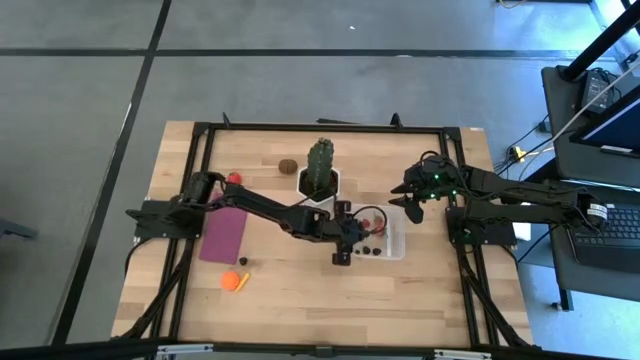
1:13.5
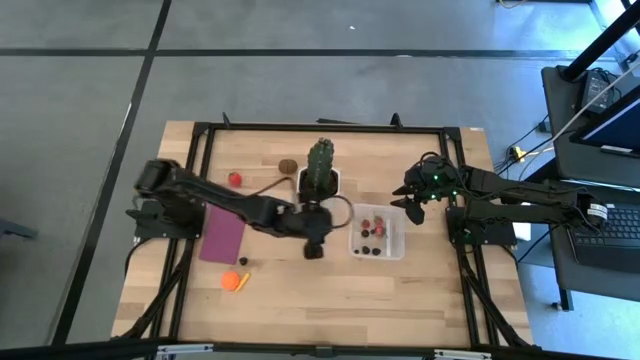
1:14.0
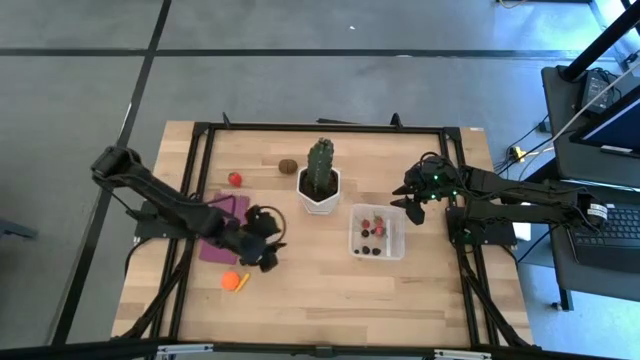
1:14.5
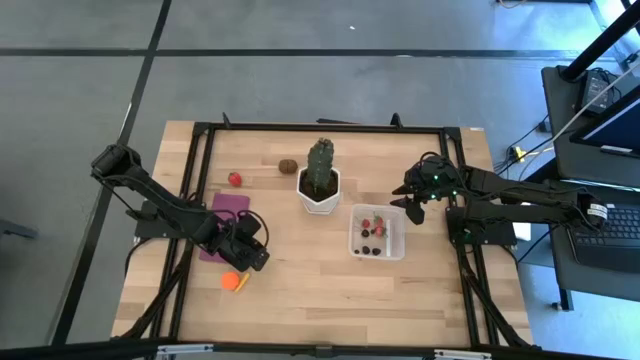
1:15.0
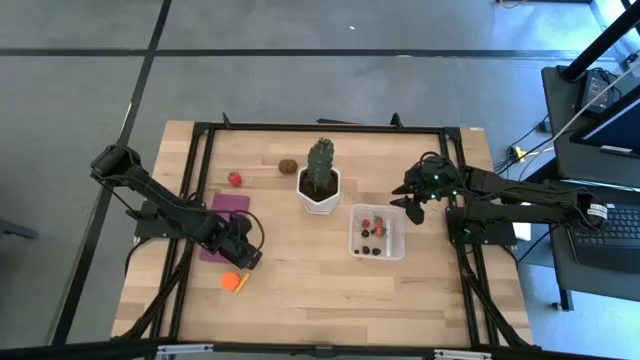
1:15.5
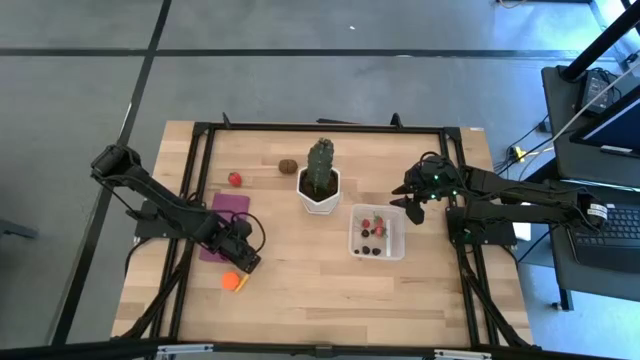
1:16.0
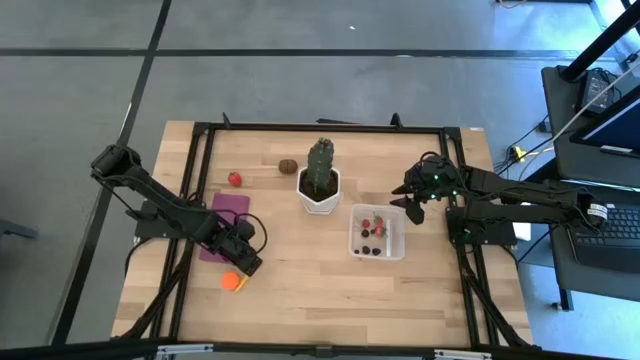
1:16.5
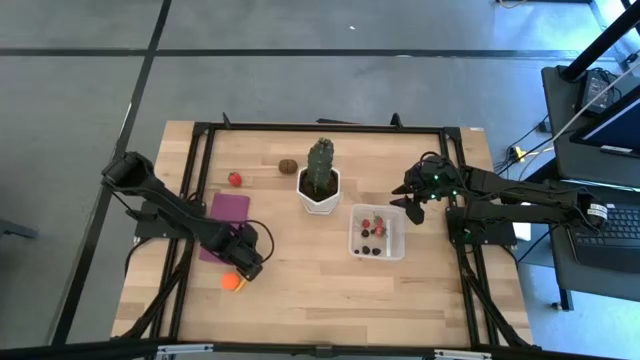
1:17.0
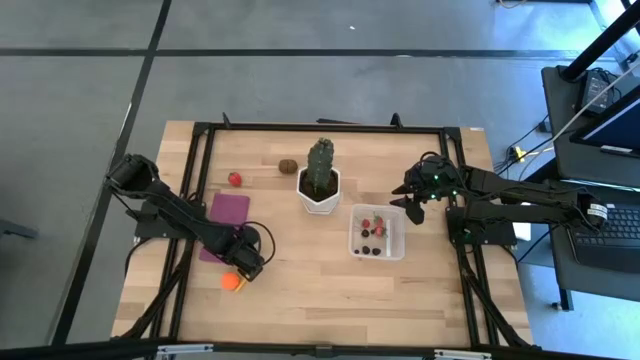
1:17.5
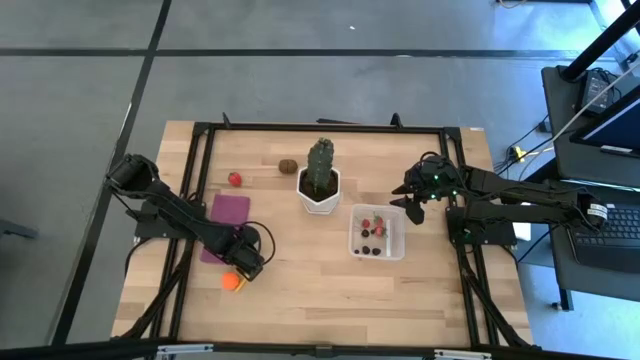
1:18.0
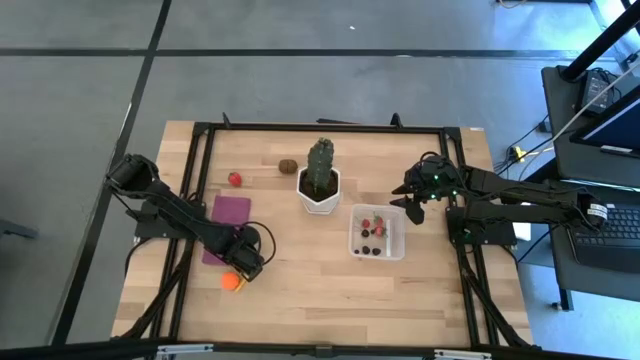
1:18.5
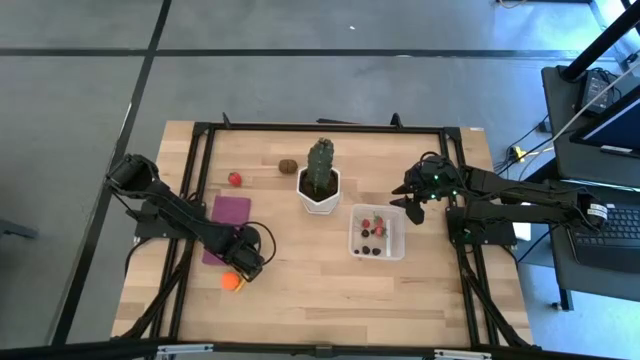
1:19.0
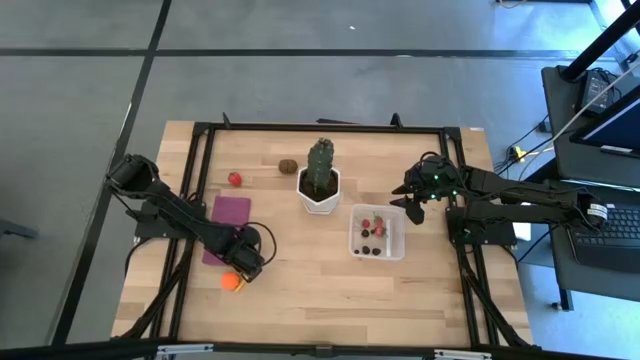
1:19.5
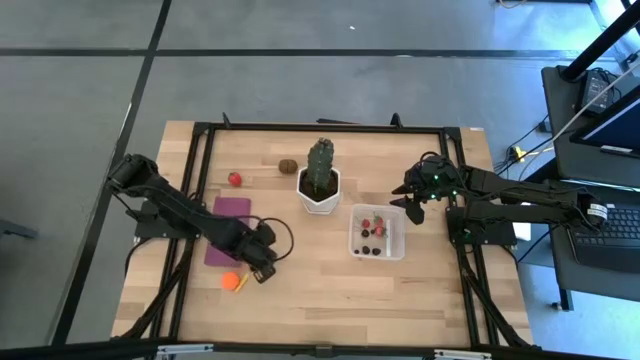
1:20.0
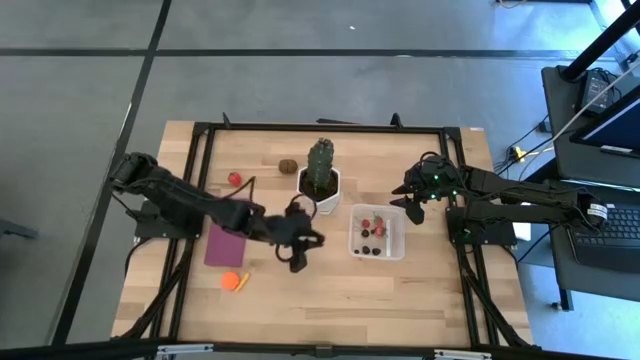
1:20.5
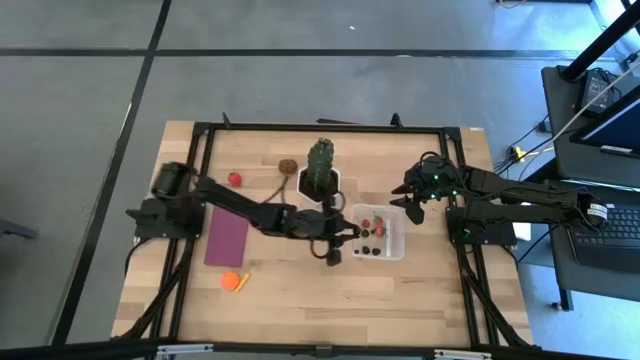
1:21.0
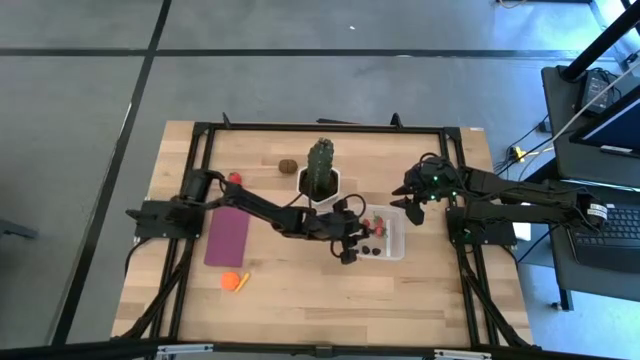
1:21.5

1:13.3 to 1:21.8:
Task: Pick and placing Produce into tupperware
Put the black cherry into the transparent bin

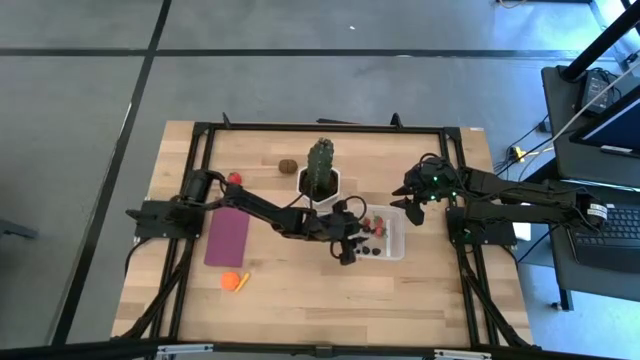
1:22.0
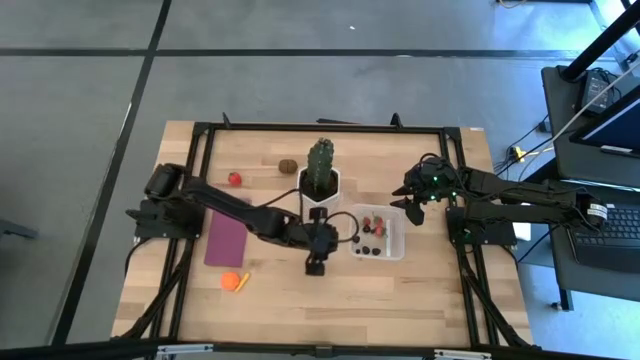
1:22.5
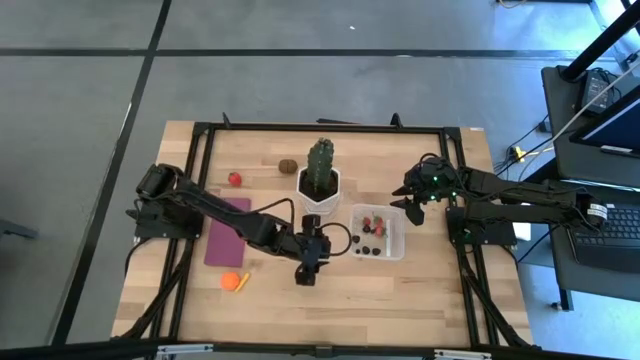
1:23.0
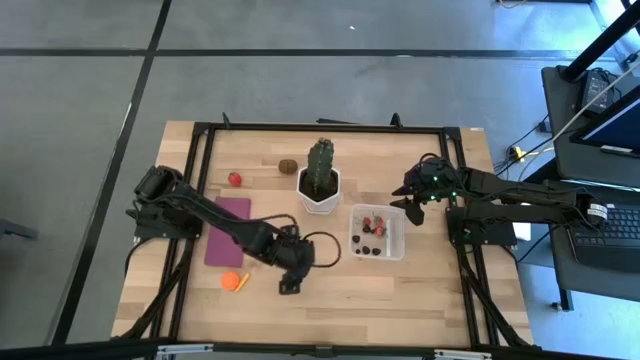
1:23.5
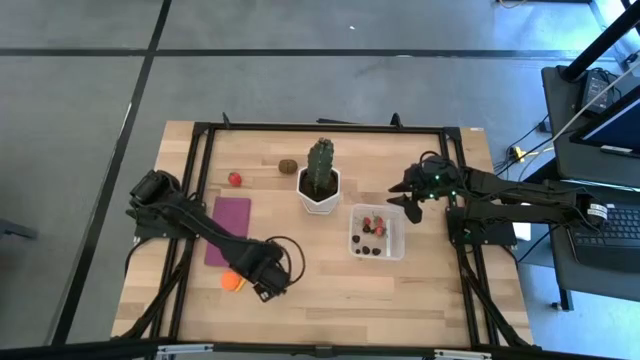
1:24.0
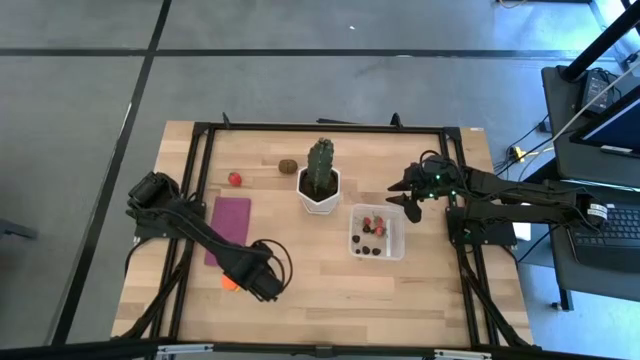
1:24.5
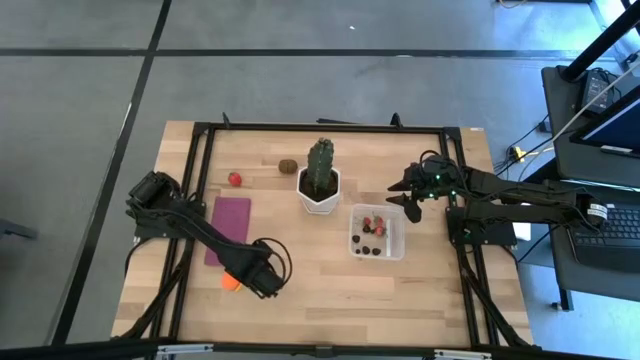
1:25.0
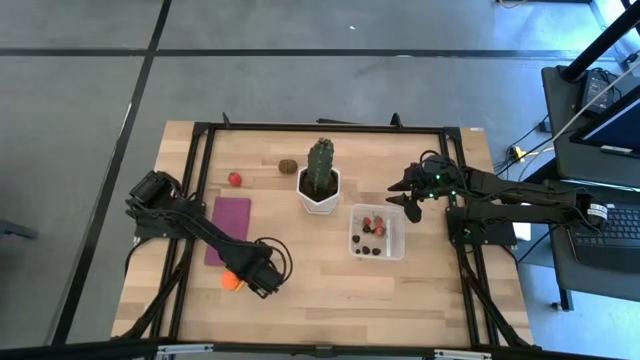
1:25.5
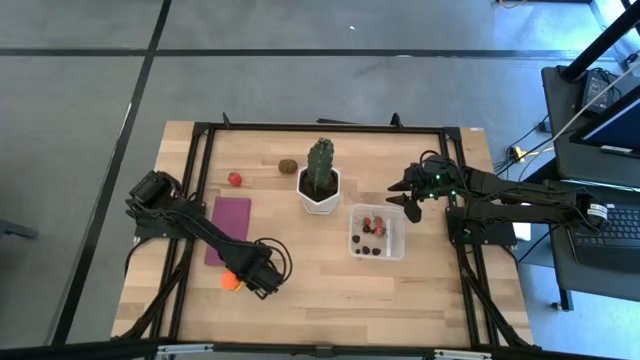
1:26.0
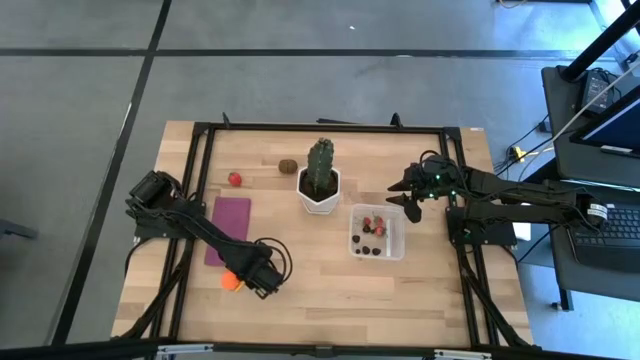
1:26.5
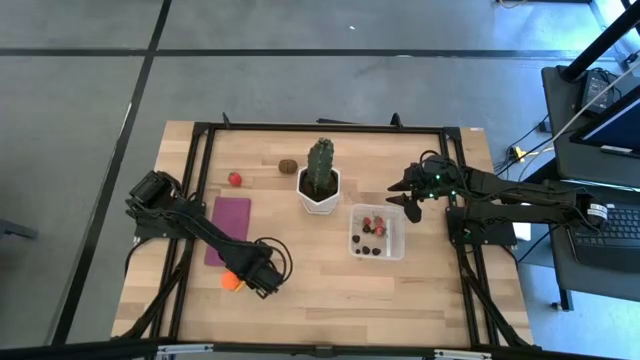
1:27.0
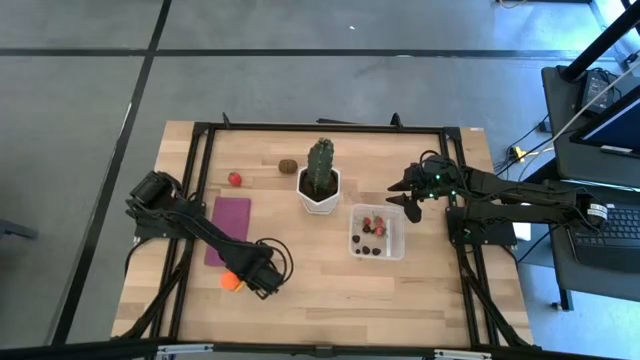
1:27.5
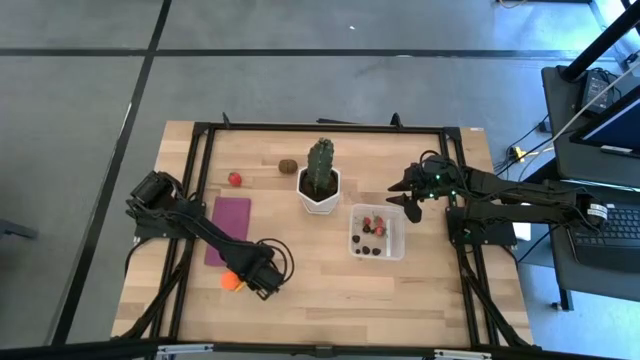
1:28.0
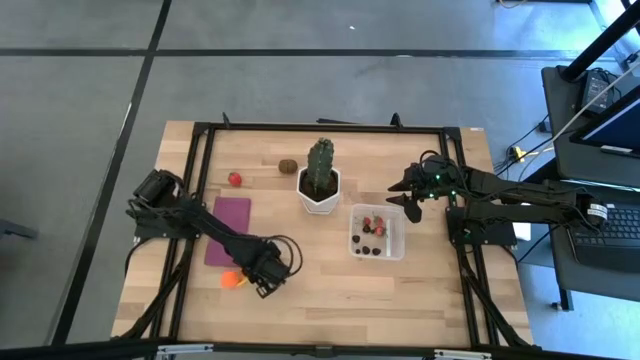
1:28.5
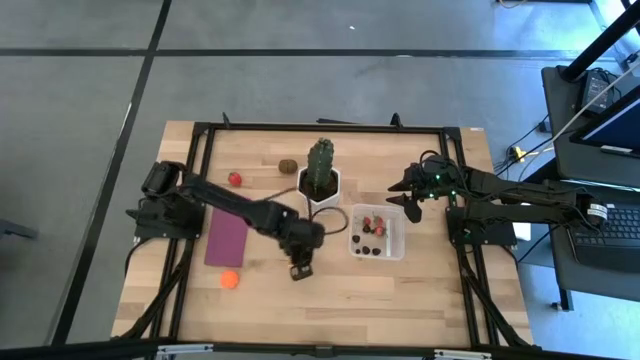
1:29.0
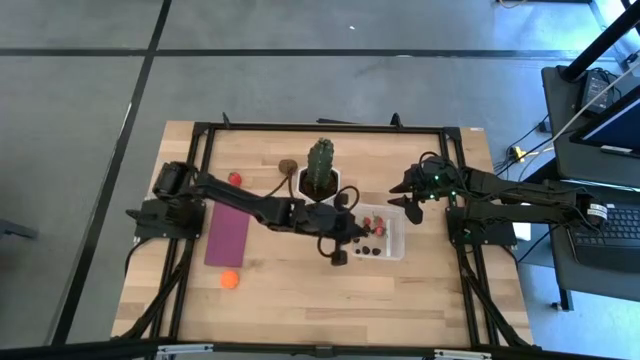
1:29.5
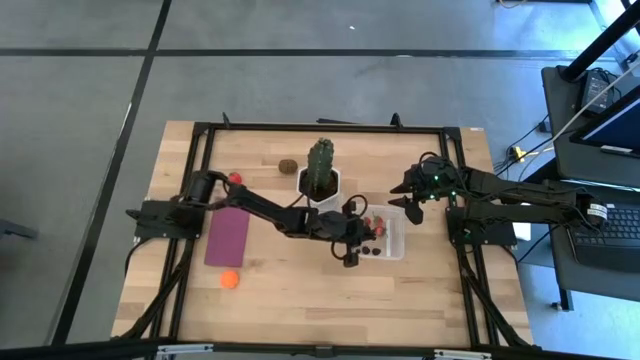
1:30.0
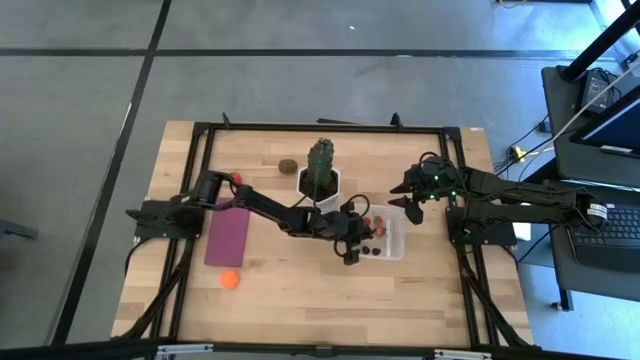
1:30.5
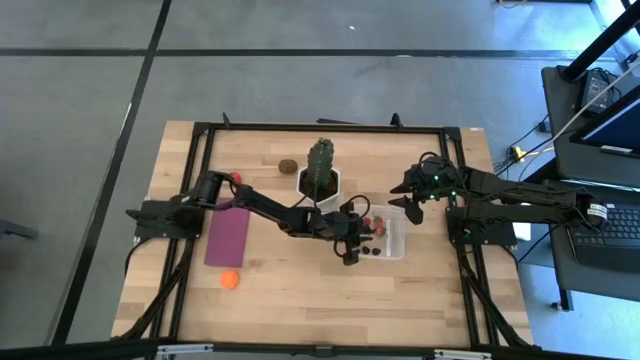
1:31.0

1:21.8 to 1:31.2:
Put the corn into the transparent bin

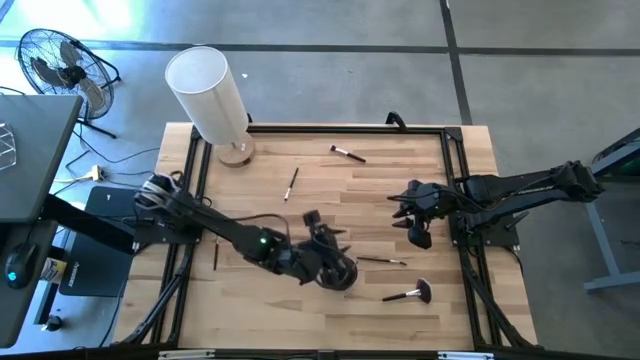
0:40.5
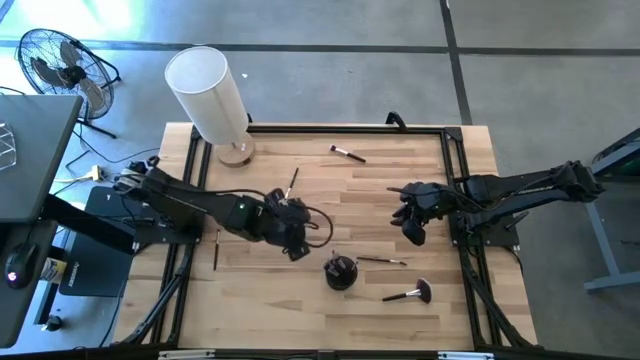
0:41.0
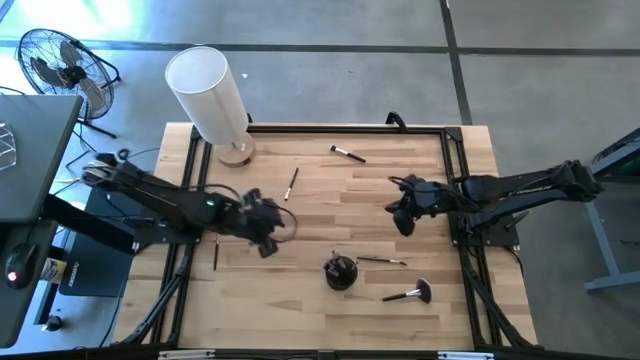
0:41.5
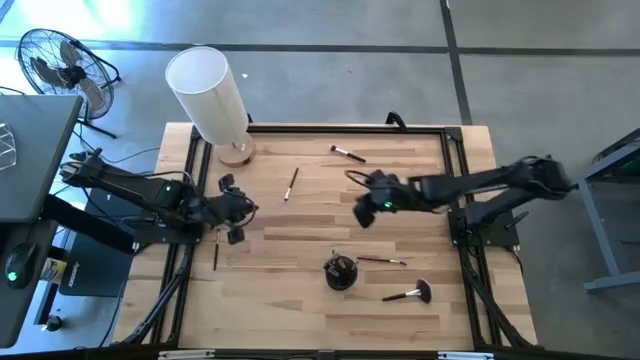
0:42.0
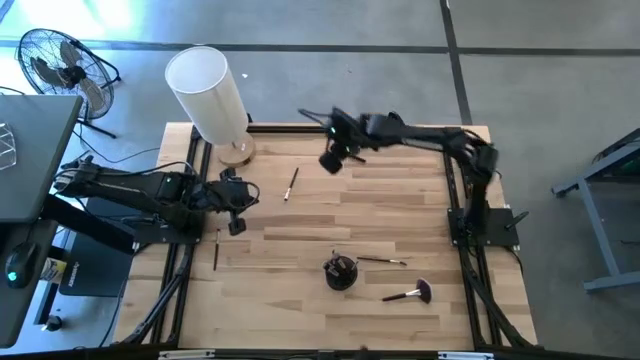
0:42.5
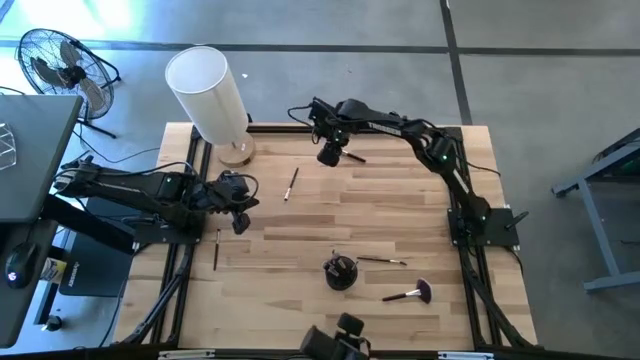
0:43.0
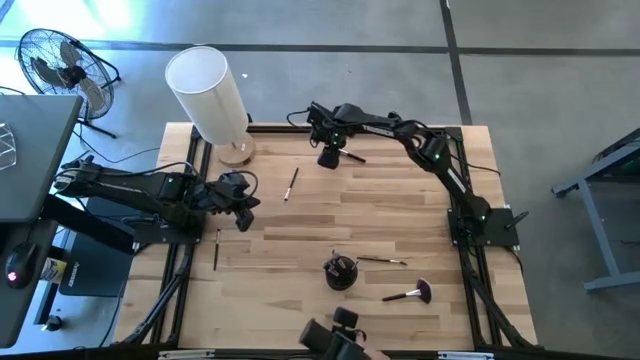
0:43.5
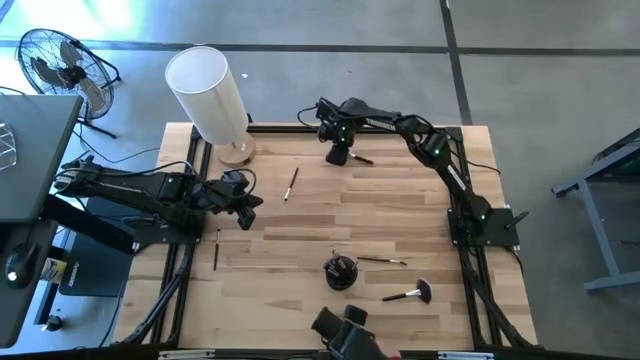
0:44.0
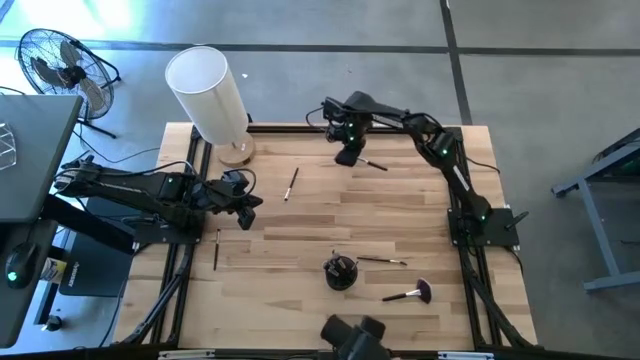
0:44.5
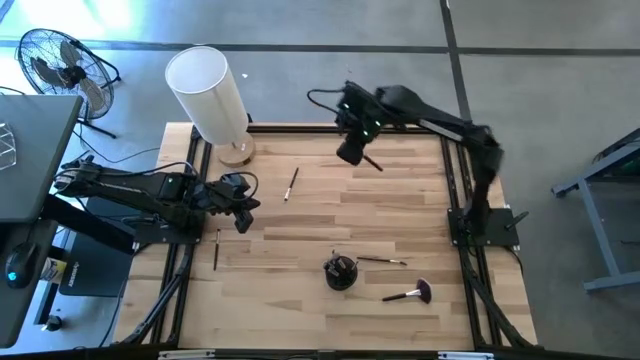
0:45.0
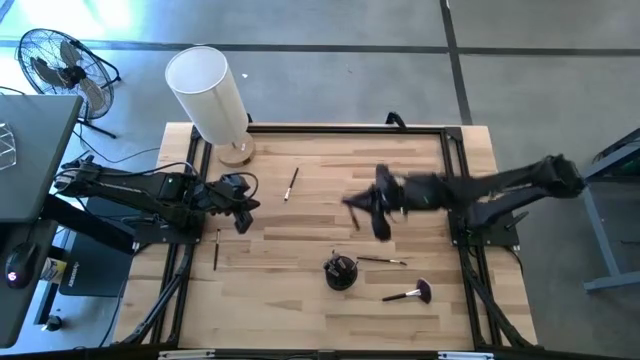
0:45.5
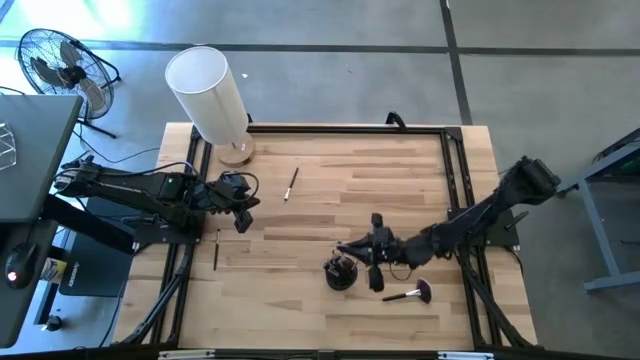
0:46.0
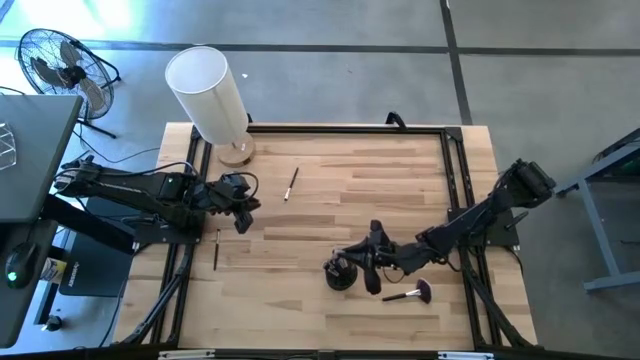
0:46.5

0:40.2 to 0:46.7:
Task: Pick & Place Makeup Supplies
Put the makeup brush into the black makeup holder
